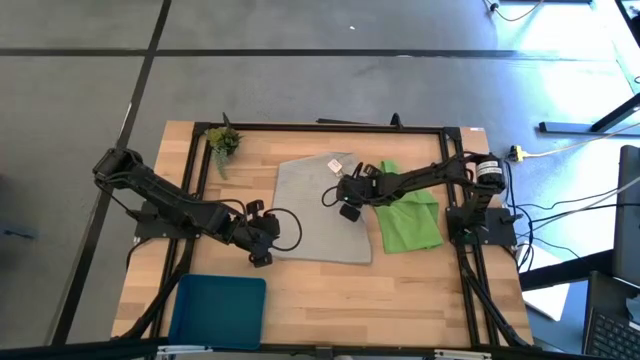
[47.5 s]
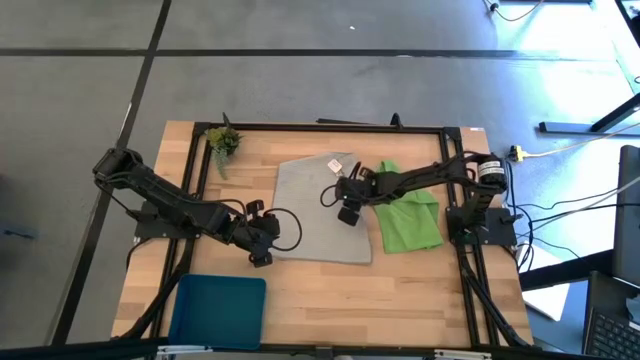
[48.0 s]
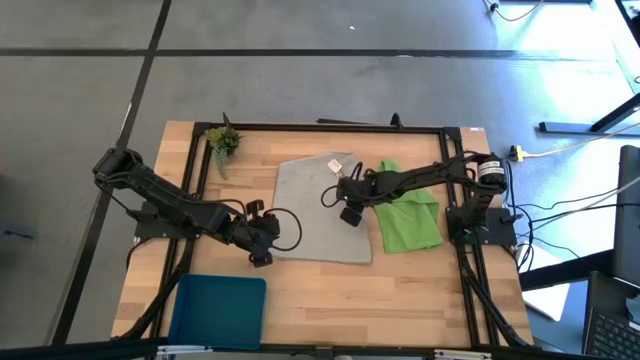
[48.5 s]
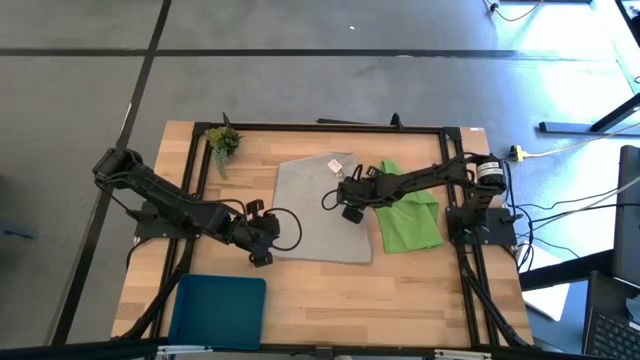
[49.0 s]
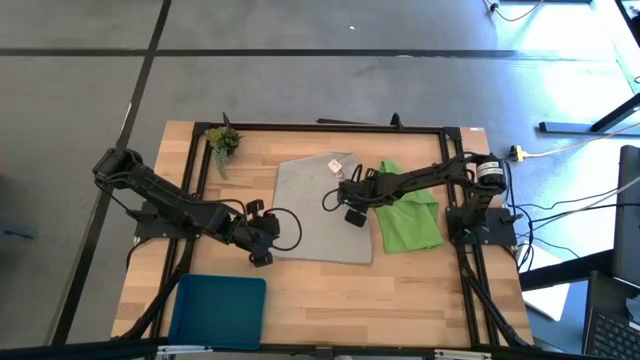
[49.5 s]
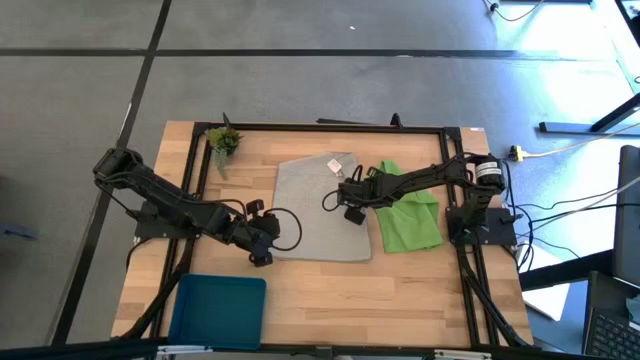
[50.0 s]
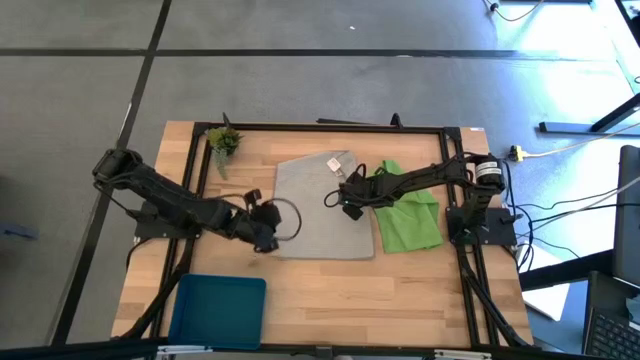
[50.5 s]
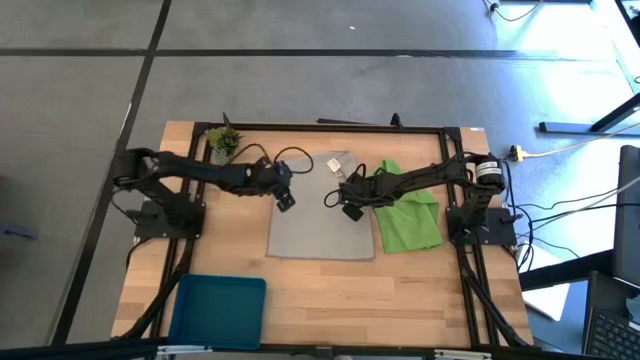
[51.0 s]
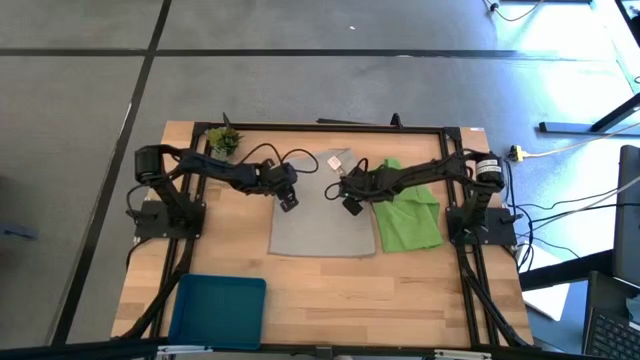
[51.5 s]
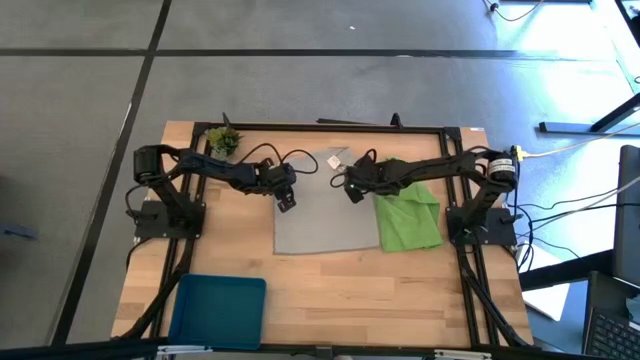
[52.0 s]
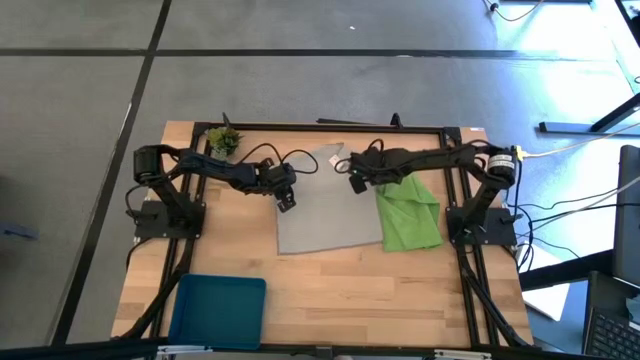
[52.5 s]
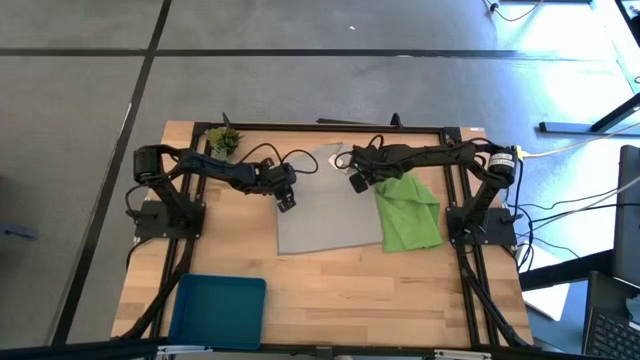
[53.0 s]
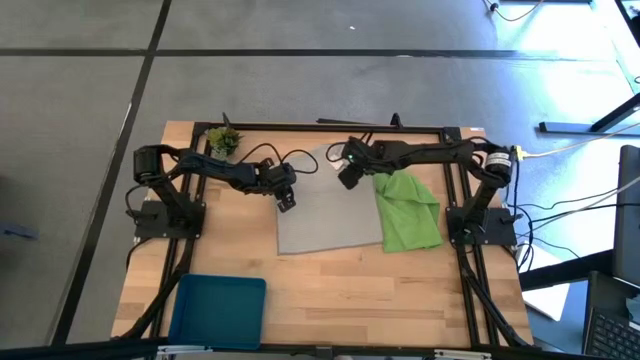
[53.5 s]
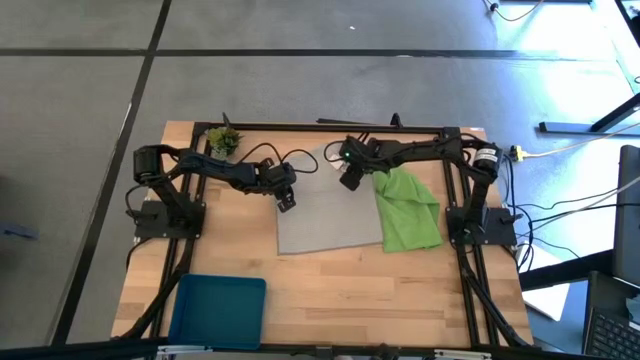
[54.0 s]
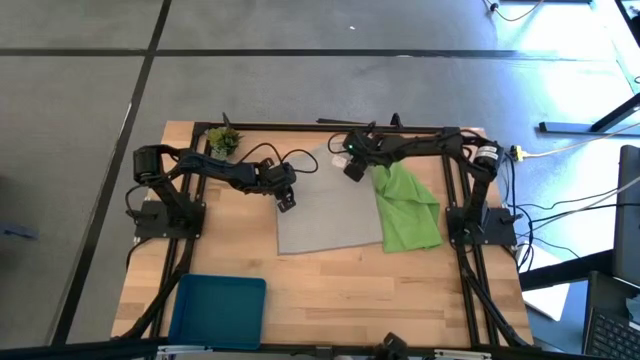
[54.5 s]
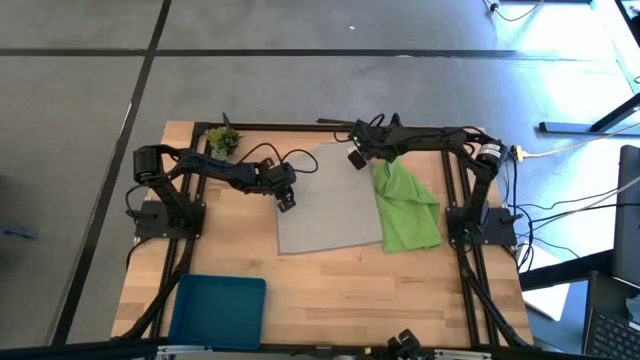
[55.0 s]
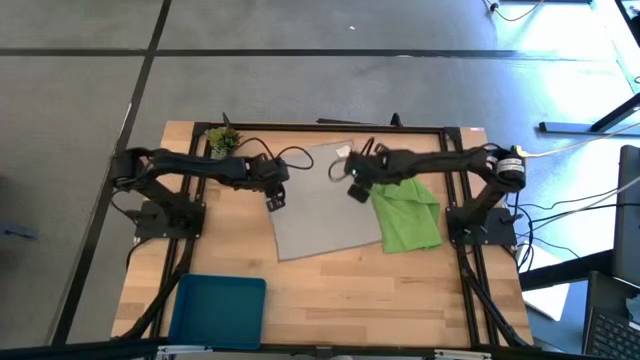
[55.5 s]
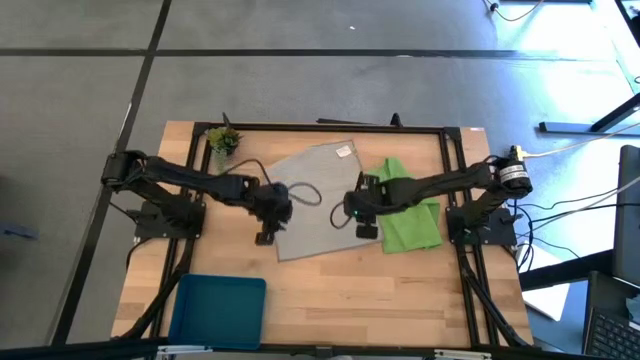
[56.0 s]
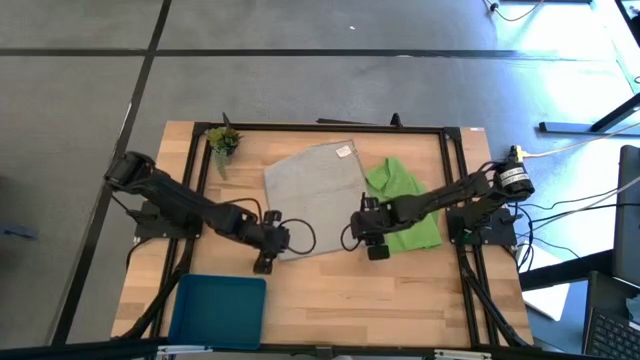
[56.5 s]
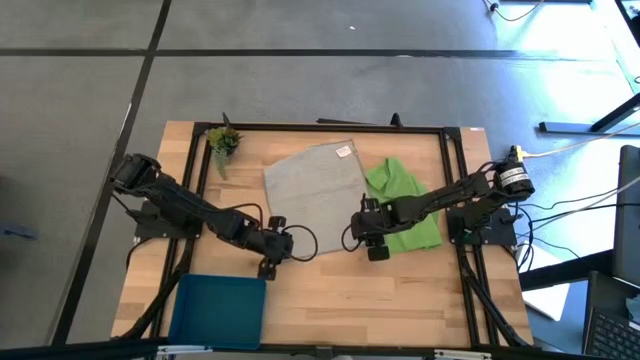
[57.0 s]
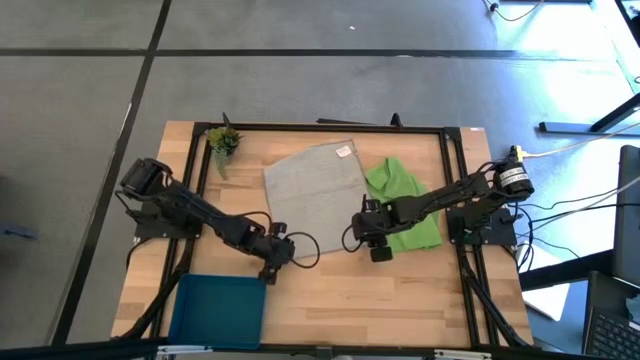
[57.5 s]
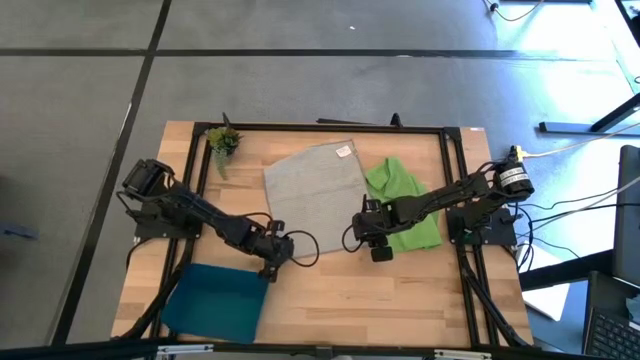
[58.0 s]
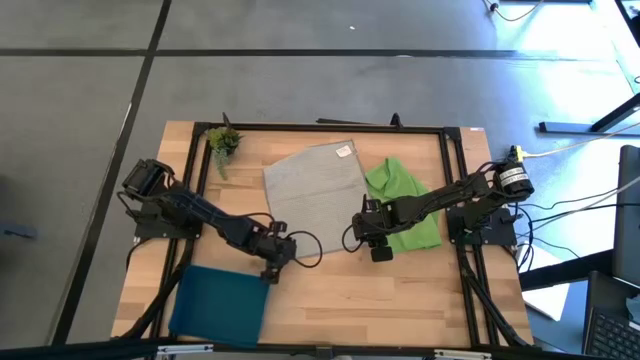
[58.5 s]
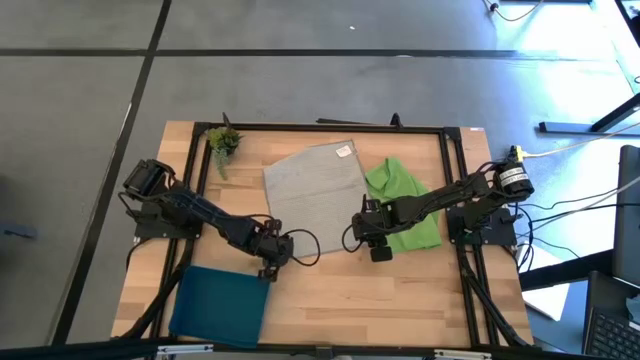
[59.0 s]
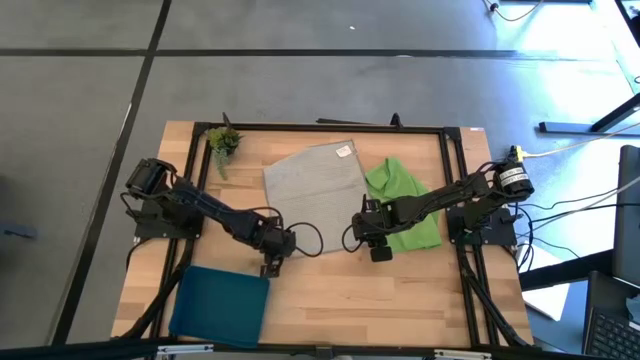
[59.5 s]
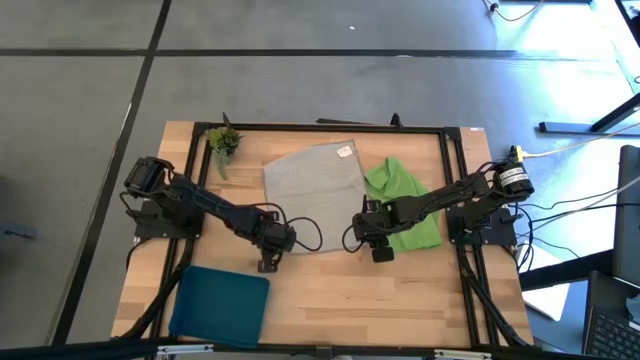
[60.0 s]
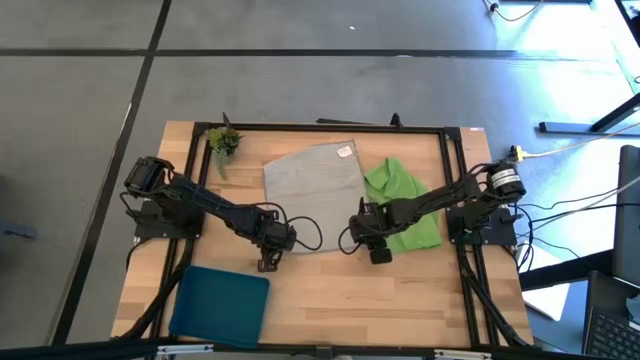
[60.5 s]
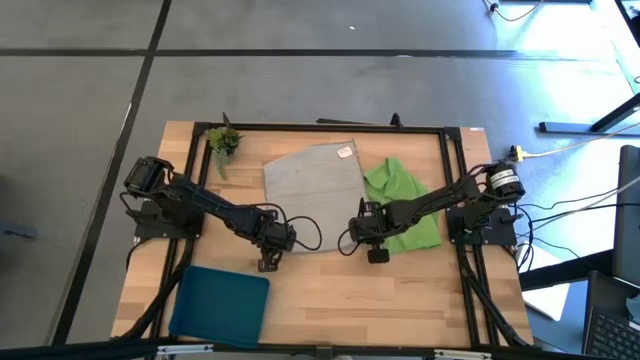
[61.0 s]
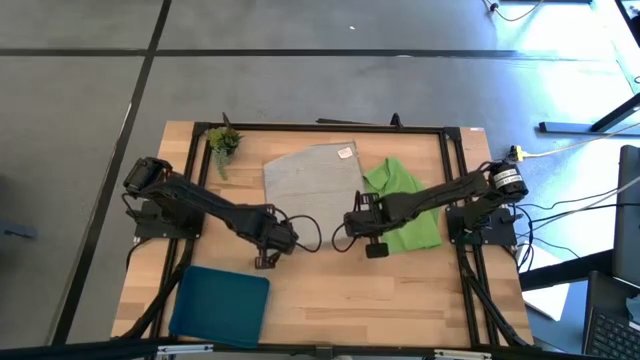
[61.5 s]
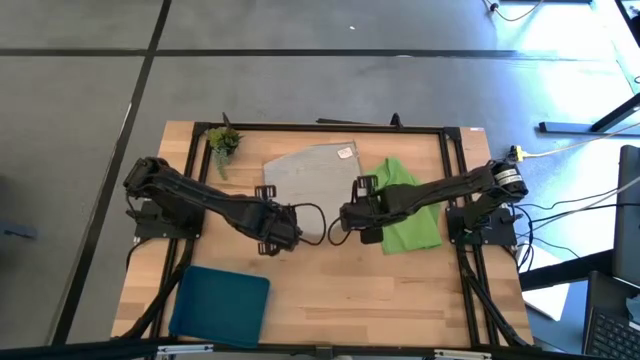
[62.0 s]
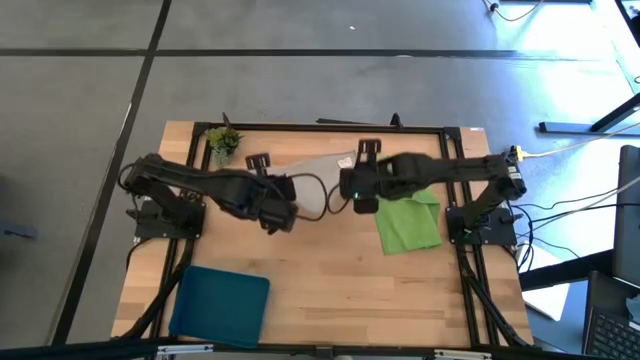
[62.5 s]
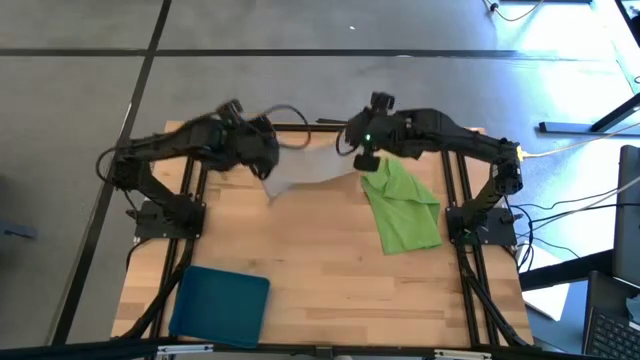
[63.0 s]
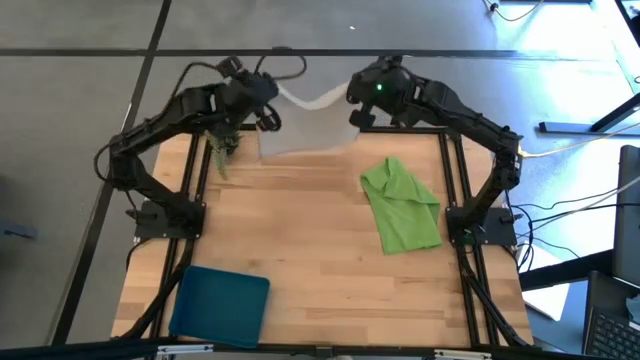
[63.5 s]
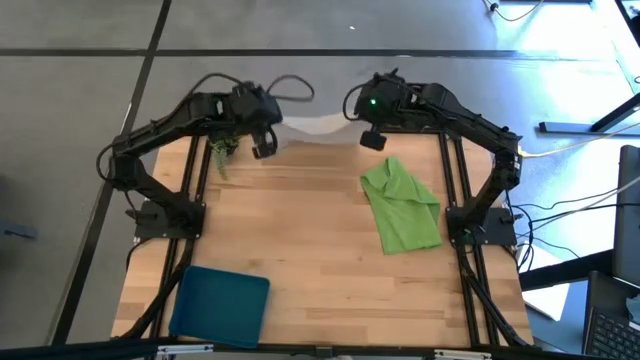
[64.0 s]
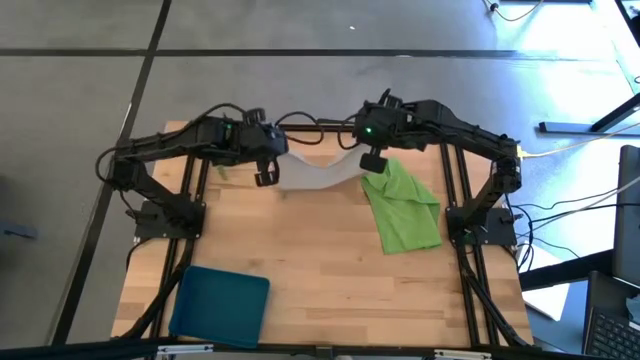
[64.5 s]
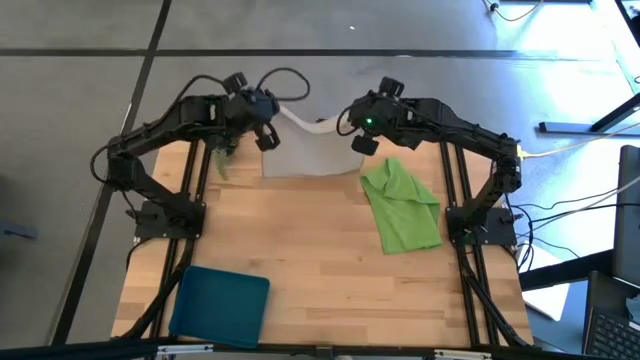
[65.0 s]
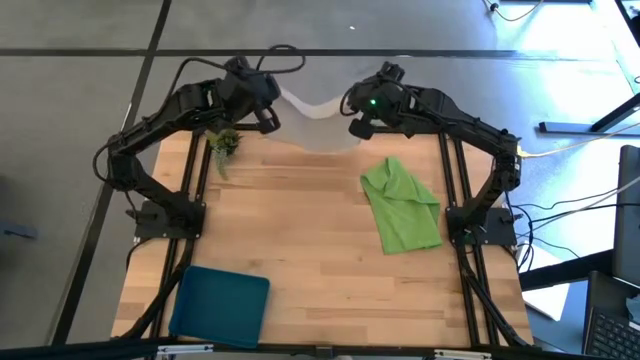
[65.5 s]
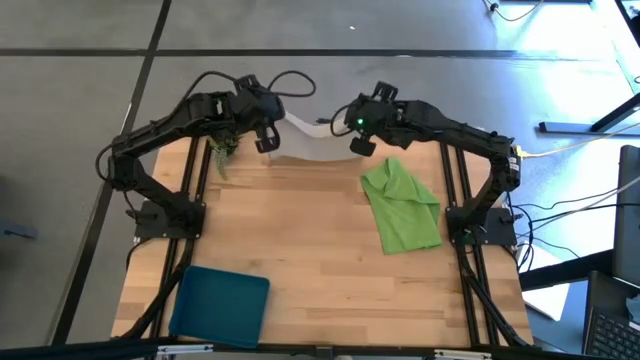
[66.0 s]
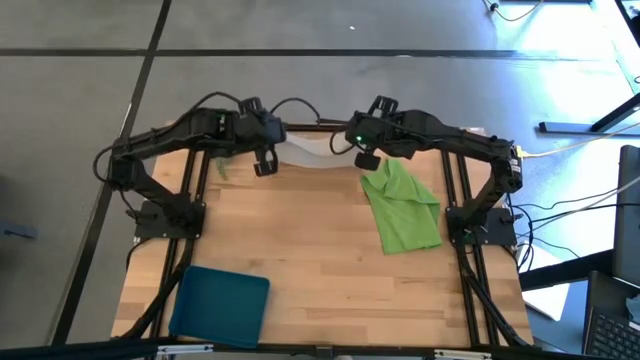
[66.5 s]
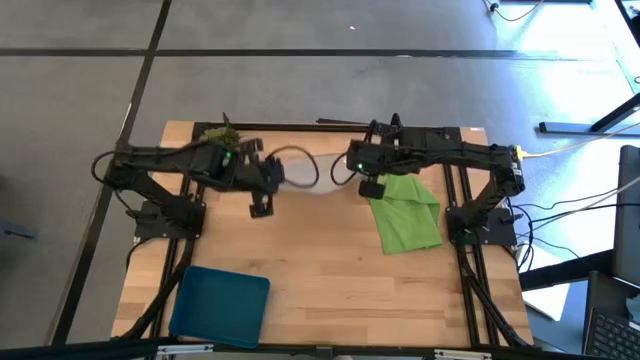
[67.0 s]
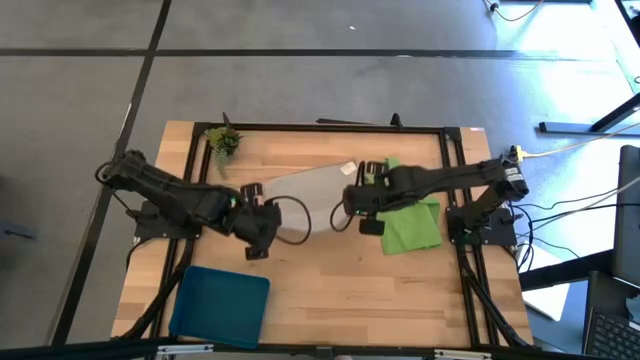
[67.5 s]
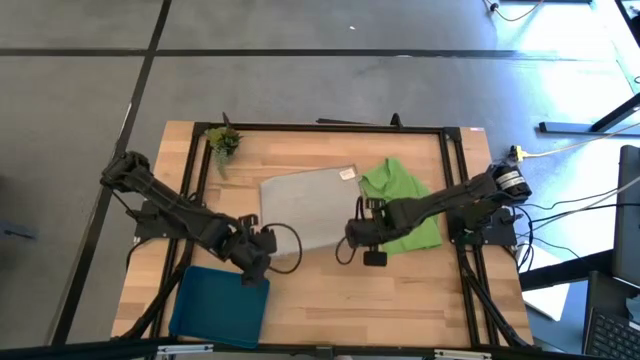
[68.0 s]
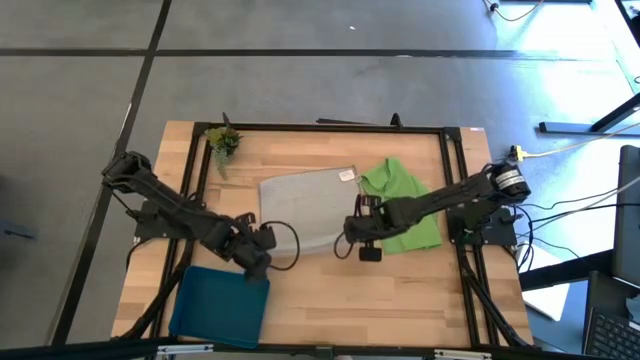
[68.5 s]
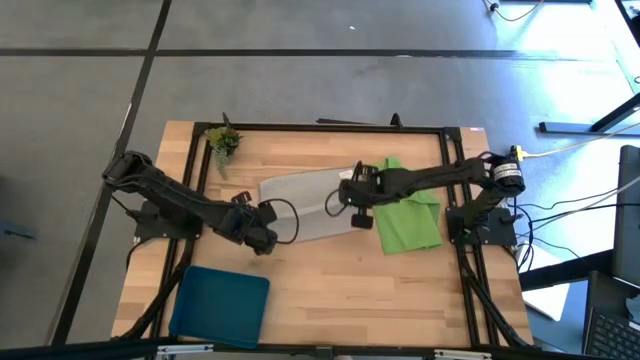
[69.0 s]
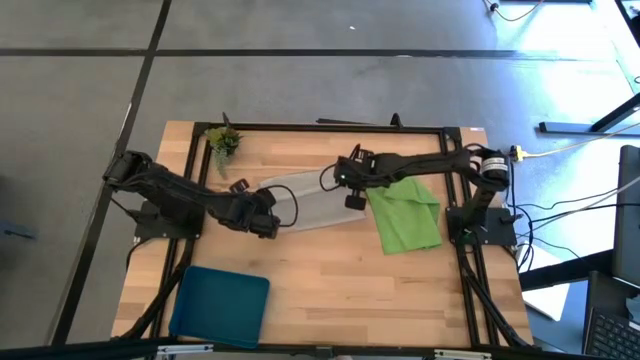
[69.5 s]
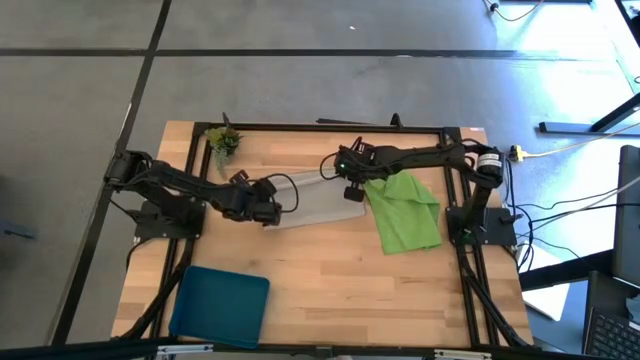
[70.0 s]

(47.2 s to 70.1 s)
Task: Fold microfiber towels
Fold the gray microfiber cloth
